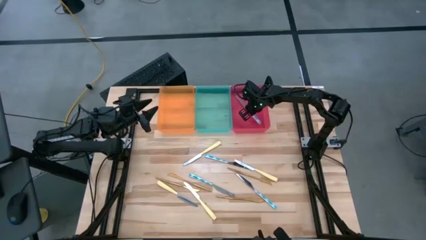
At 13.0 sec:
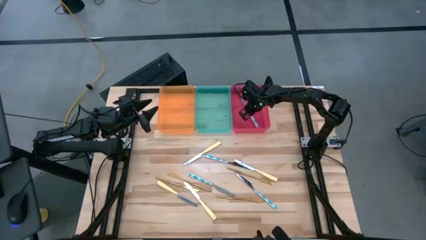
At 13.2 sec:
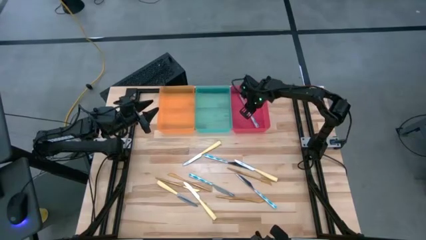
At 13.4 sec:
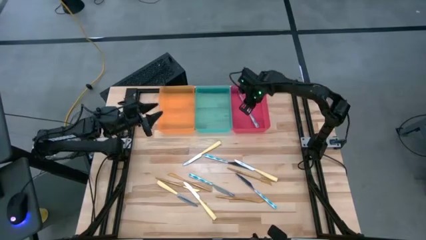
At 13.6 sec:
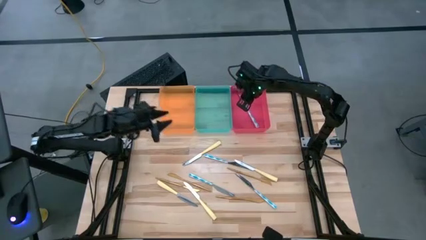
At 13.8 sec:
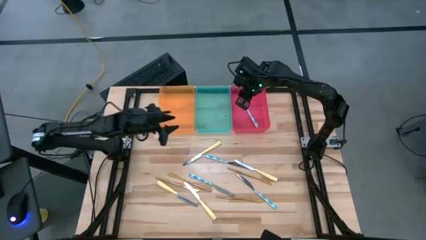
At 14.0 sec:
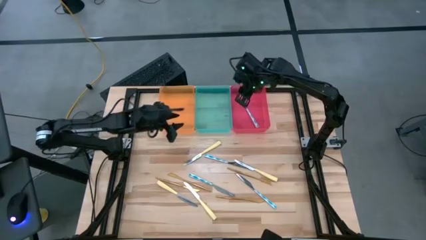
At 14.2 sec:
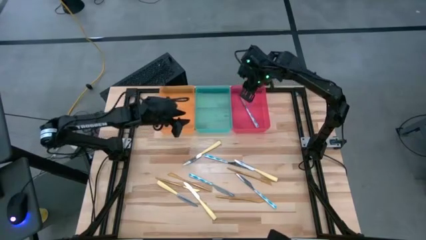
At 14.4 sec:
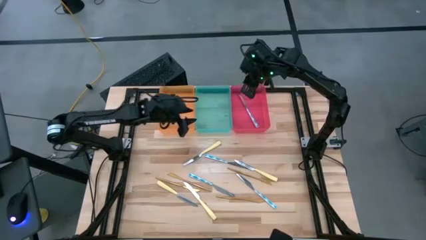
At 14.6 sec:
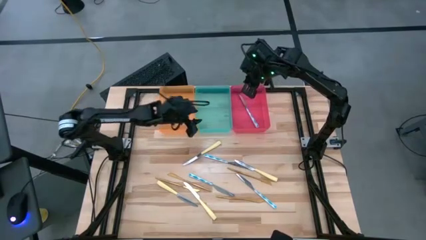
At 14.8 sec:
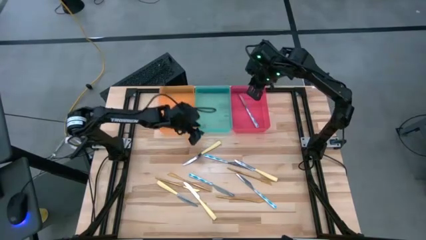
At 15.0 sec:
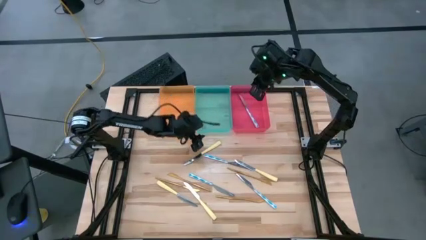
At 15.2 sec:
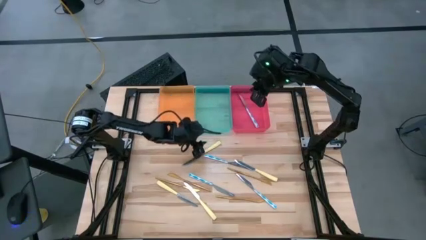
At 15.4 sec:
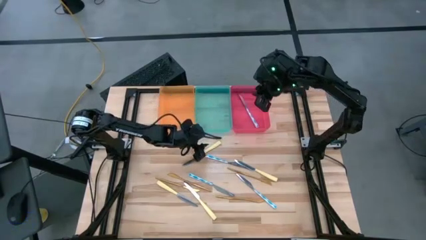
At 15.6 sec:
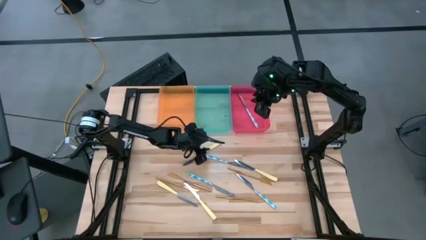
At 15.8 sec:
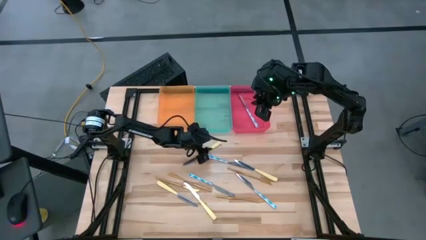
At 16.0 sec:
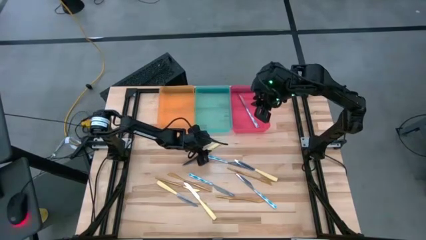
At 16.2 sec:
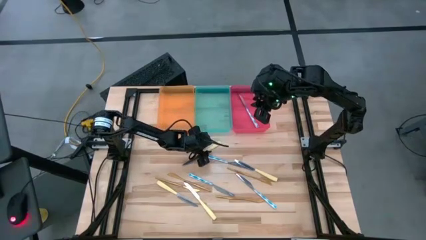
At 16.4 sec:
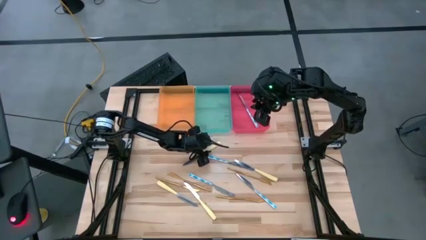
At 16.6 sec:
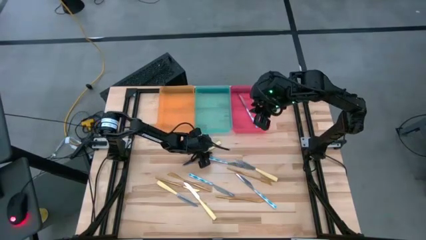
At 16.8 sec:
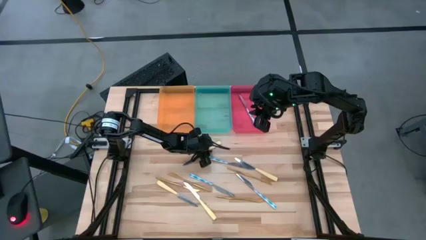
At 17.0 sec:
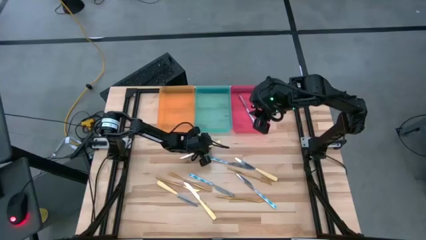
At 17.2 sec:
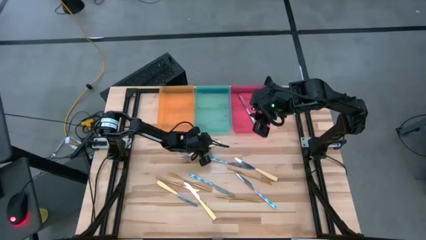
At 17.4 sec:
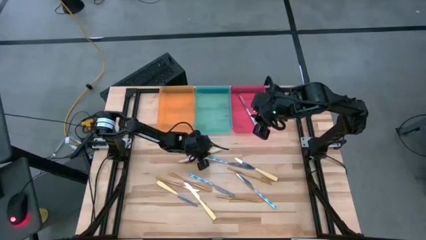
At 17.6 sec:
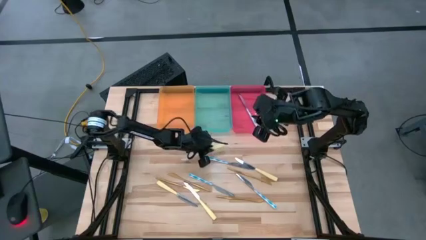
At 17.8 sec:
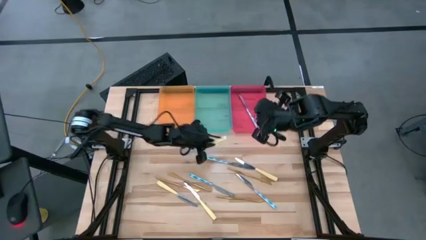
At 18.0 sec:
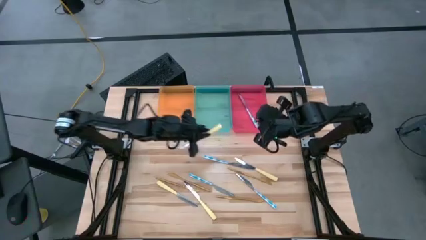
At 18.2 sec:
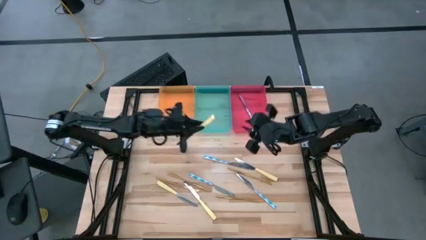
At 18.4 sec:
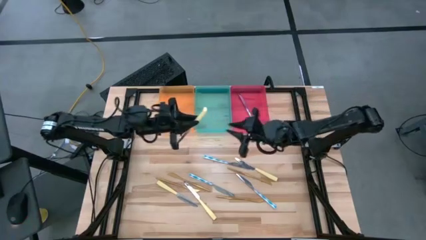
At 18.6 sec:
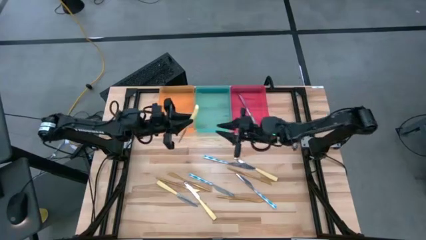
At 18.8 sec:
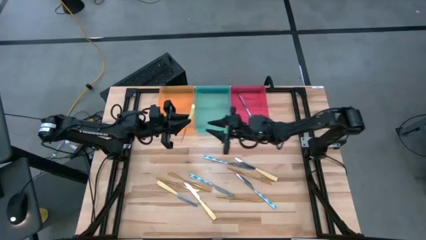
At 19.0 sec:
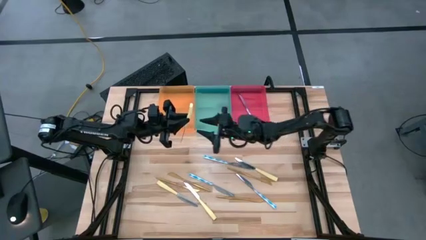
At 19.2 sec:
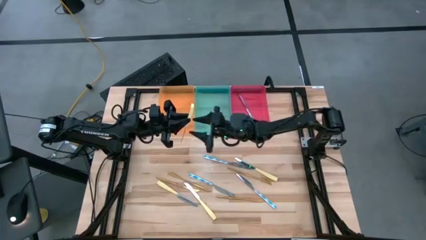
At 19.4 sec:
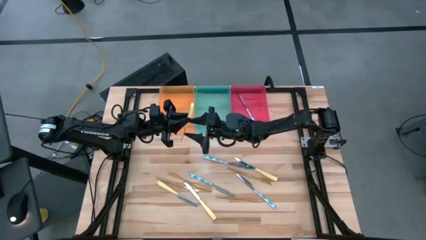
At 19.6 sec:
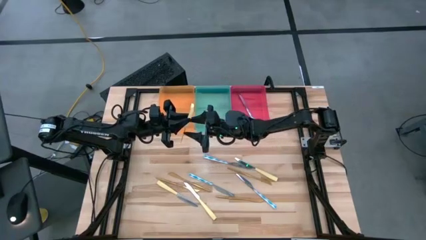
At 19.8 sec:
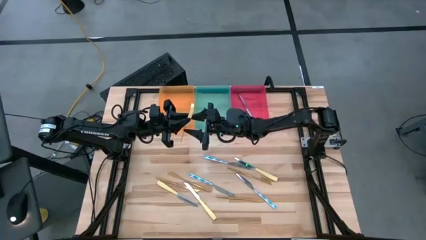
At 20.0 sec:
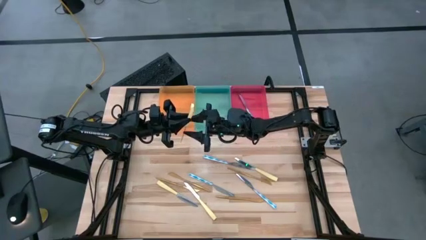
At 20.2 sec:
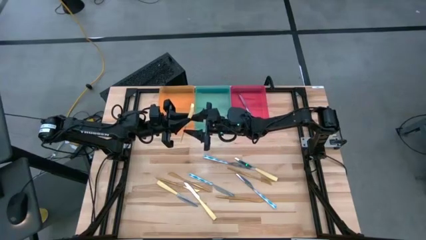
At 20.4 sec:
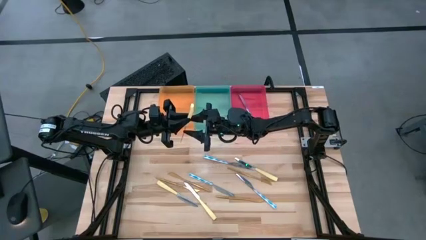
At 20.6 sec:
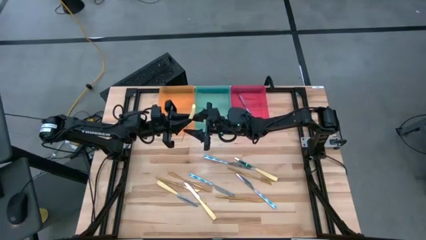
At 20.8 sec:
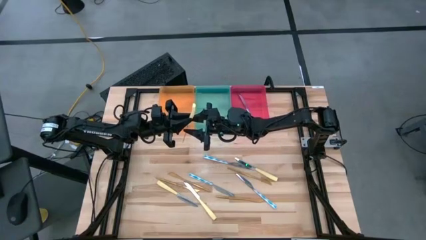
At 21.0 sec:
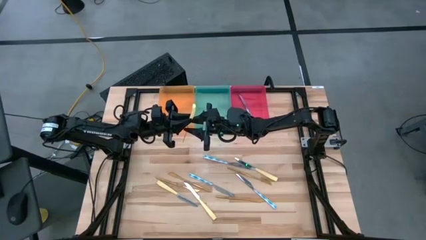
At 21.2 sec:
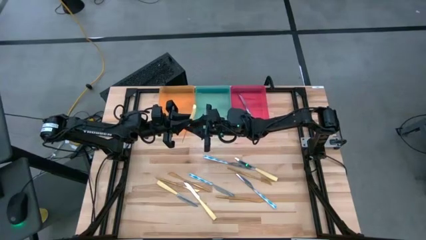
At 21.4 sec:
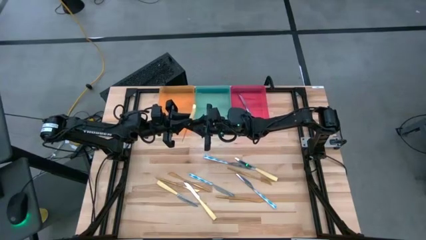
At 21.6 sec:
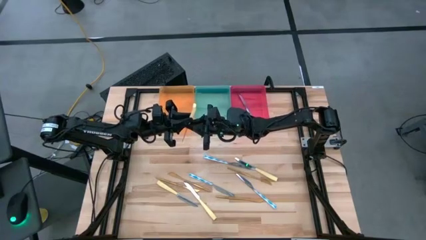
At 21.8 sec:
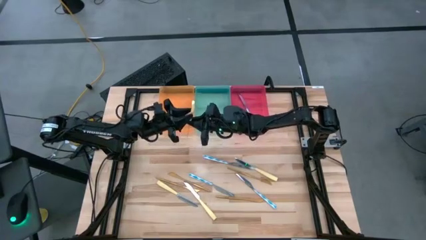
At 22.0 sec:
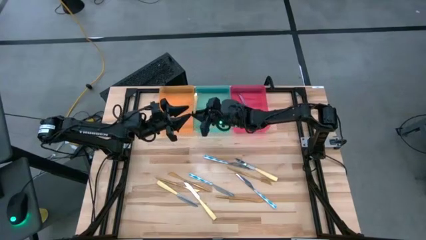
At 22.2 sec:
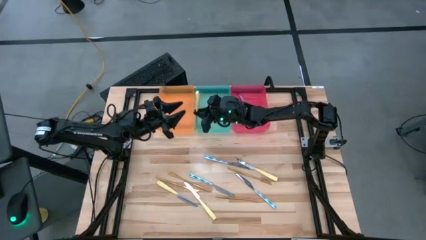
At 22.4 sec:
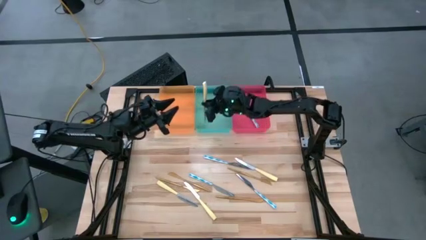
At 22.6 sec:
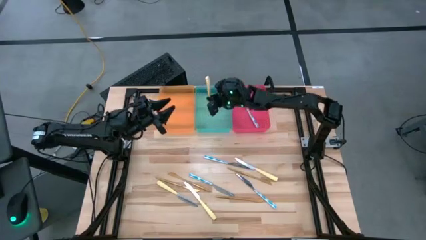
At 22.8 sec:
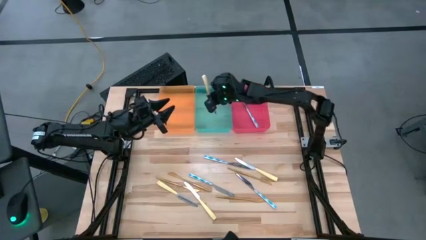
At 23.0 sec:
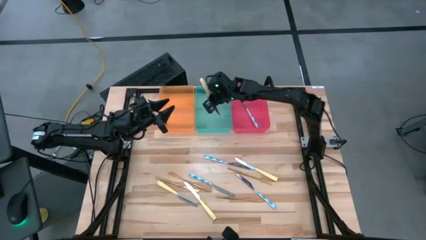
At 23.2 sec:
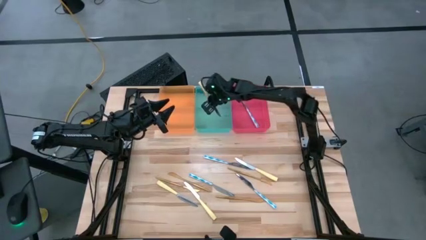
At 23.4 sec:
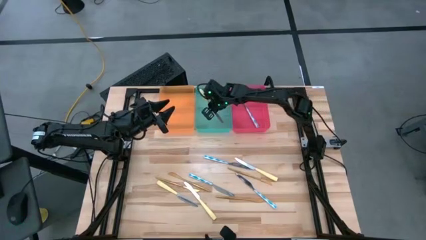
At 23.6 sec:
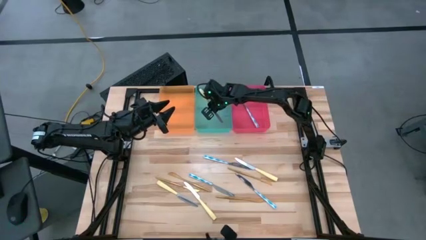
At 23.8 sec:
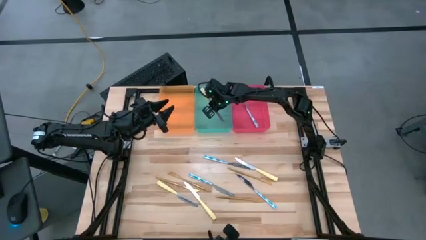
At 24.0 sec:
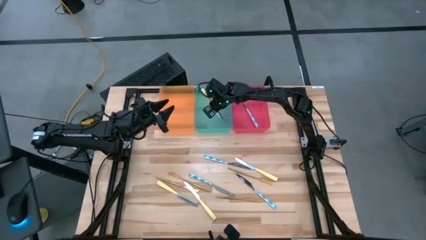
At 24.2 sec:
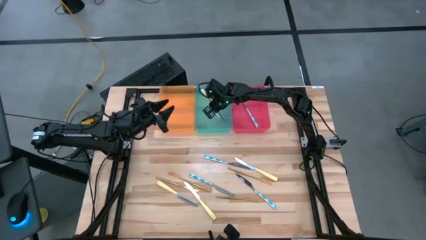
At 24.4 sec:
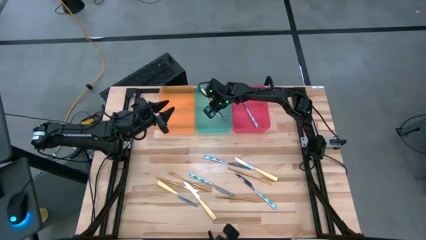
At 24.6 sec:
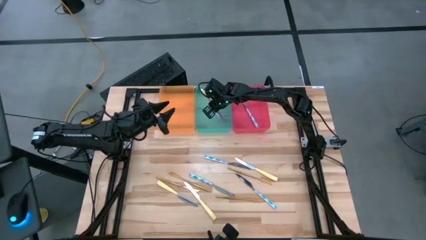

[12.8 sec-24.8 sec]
Task: Sort silverware by color (type)
Put the yellow table knife into the blue bin

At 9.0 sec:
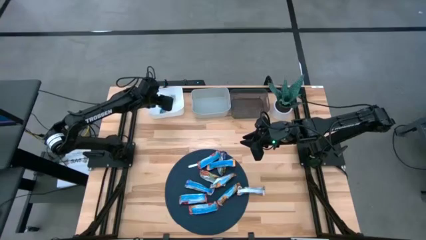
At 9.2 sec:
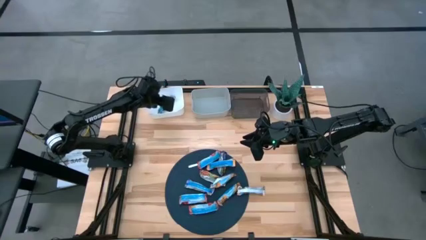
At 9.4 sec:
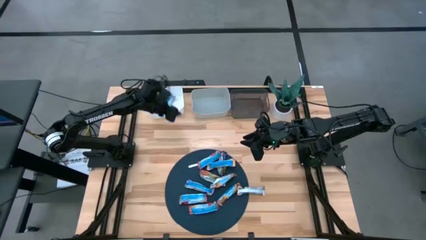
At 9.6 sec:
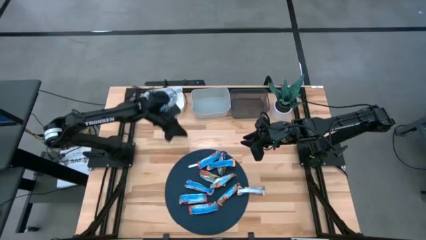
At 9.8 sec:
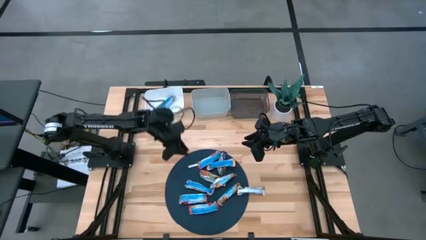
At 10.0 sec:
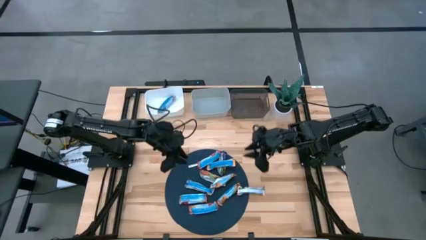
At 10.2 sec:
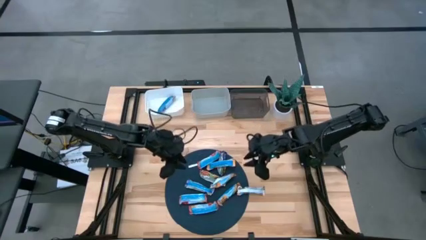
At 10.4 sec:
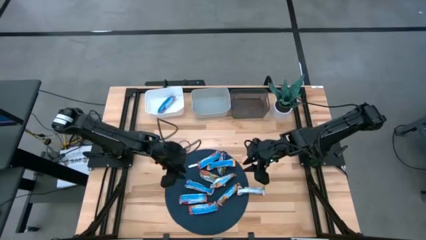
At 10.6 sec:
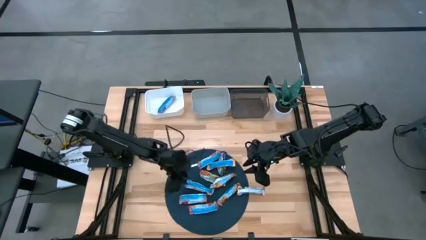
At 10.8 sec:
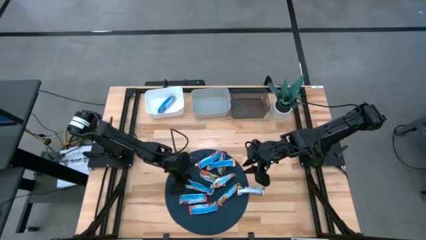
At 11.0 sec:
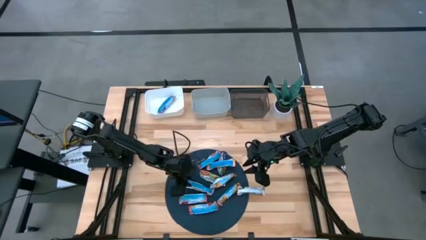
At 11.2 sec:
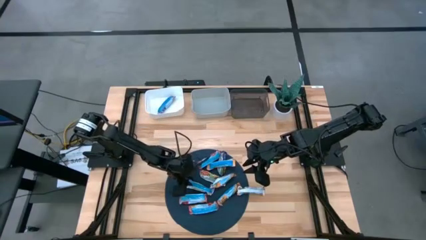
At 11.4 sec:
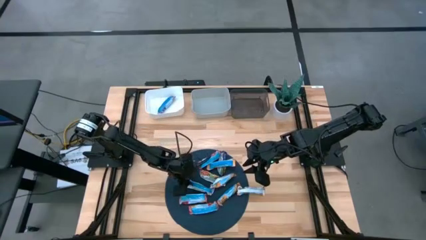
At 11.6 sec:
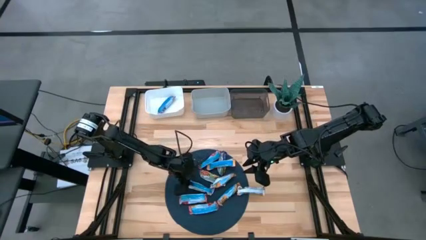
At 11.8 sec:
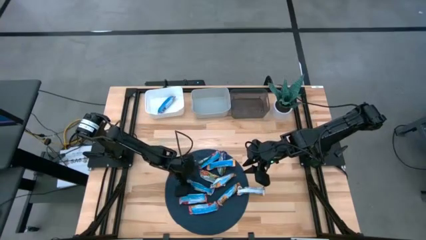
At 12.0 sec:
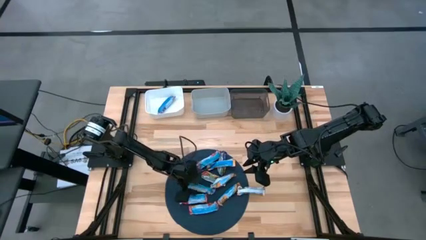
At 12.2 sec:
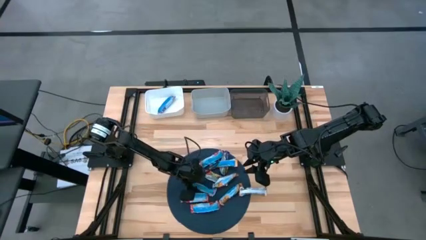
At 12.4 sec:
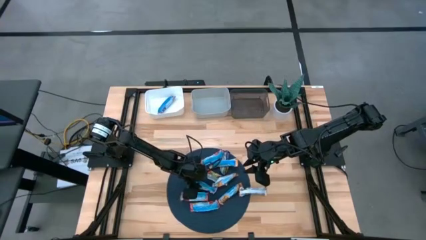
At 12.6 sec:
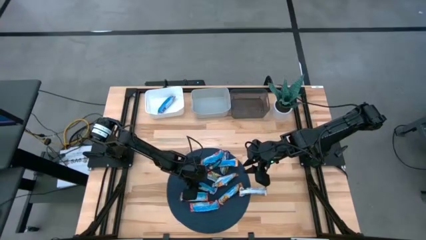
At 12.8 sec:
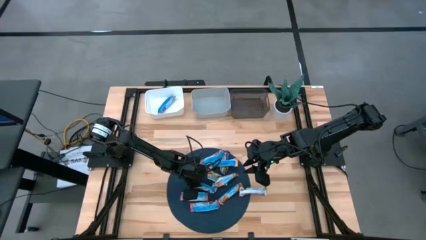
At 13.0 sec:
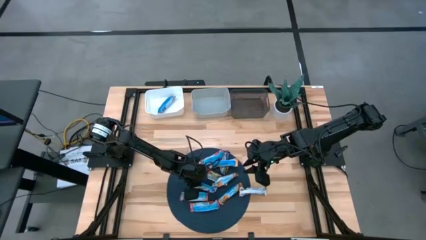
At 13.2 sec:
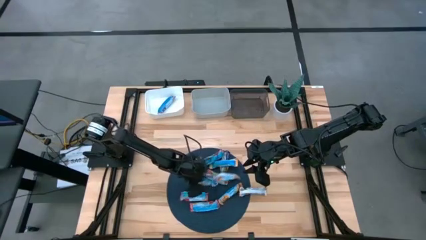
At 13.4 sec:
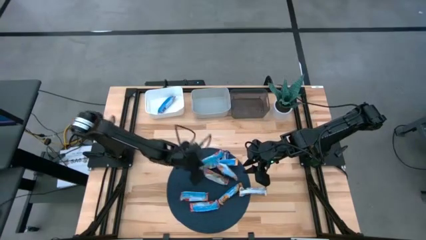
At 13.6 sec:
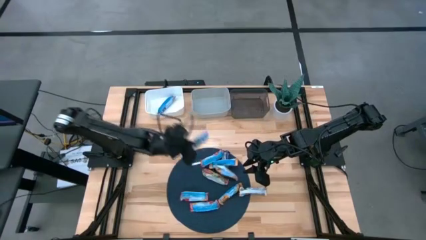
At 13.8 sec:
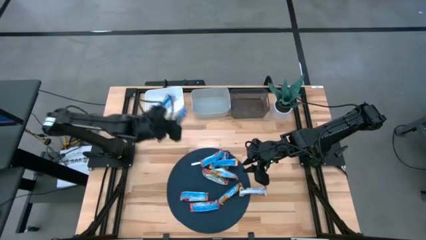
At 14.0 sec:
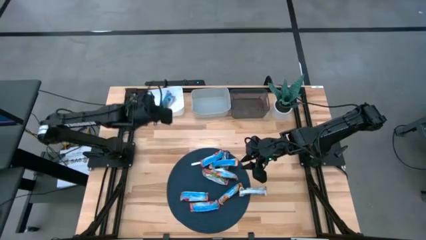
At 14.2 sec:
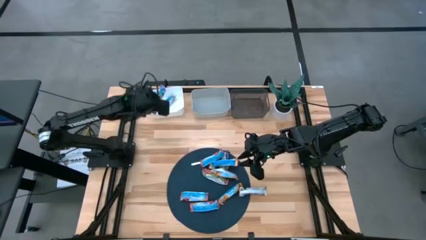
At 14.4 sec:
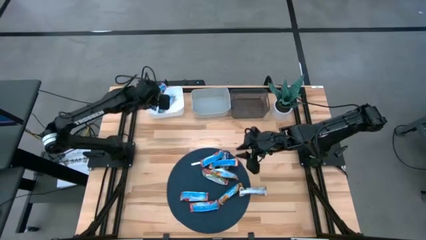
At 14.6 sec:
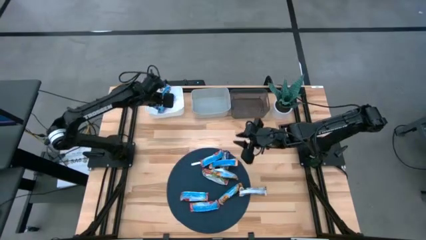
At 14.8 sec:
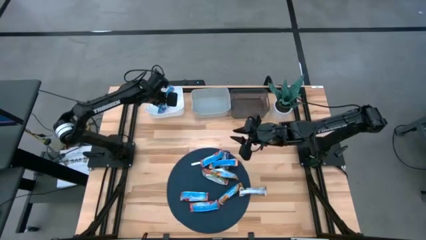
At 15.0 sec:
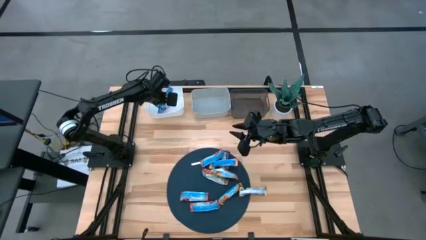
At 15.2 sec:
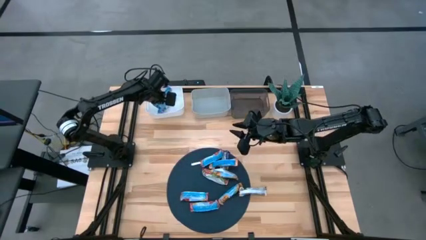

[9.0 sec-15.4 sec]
Task: Pick and place Granola Bars by type
Put the blue granola bar into the white bin
